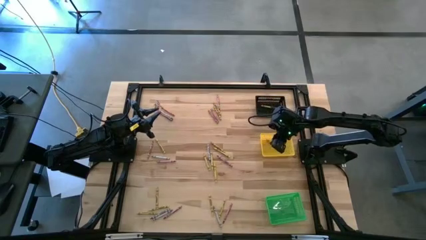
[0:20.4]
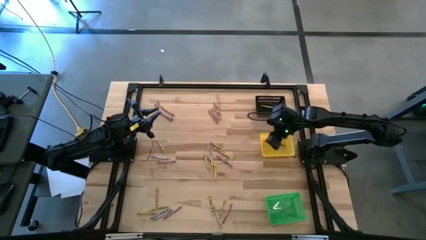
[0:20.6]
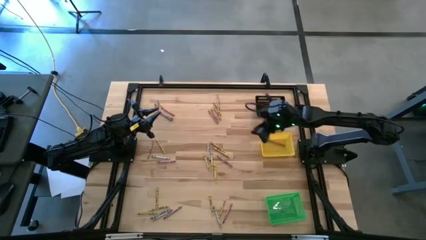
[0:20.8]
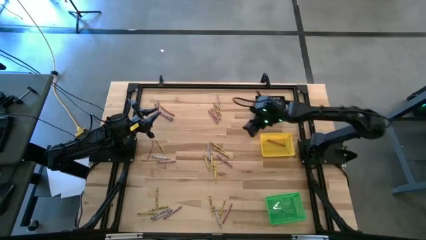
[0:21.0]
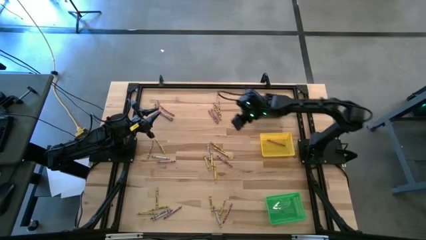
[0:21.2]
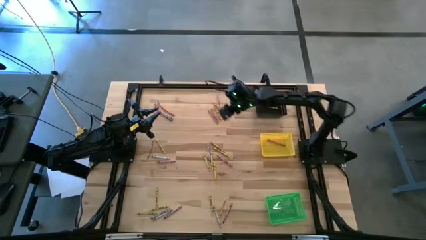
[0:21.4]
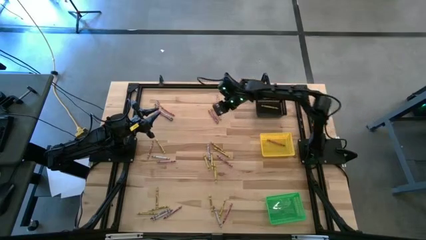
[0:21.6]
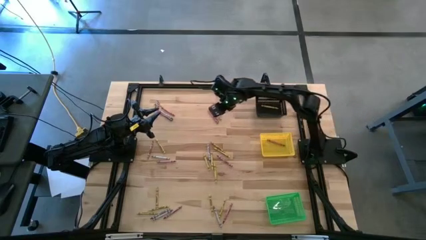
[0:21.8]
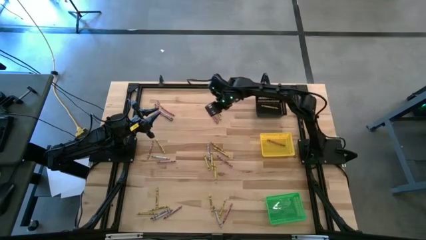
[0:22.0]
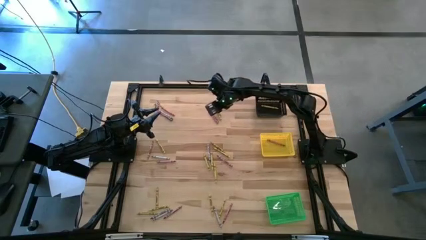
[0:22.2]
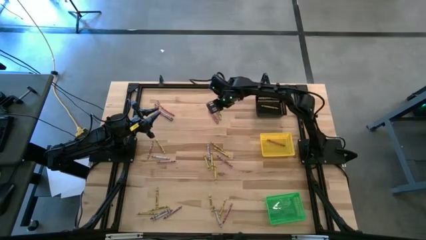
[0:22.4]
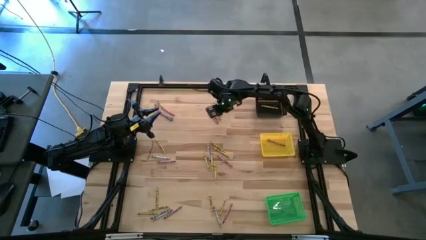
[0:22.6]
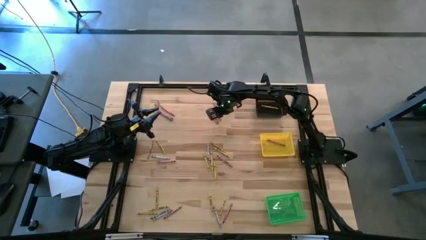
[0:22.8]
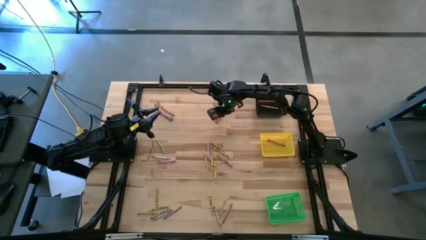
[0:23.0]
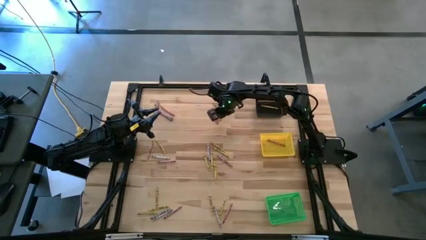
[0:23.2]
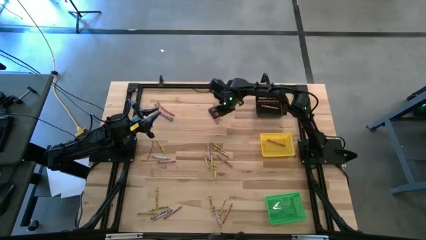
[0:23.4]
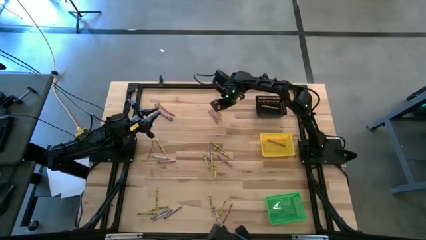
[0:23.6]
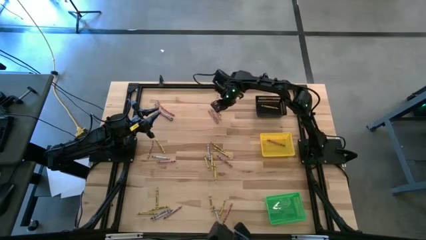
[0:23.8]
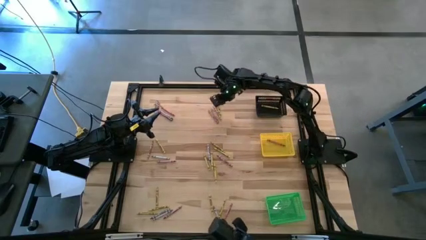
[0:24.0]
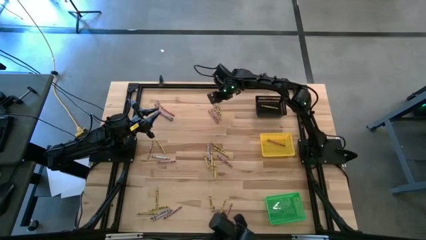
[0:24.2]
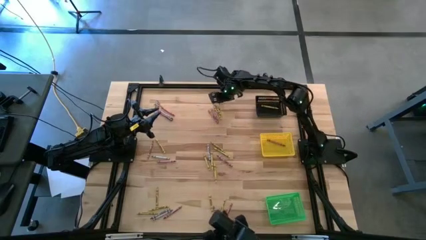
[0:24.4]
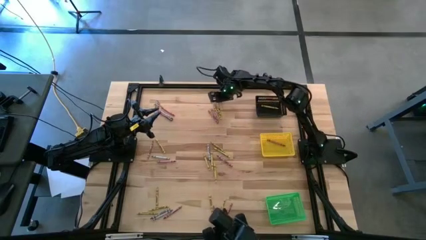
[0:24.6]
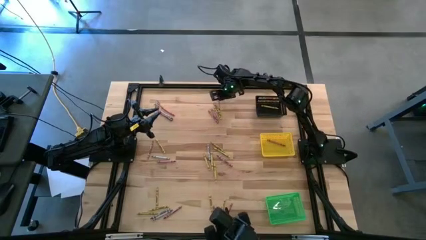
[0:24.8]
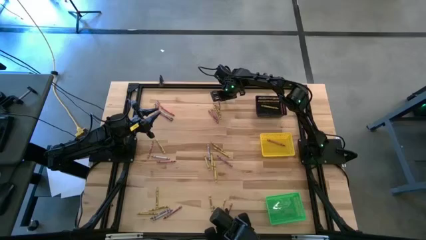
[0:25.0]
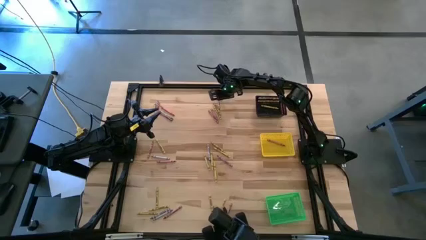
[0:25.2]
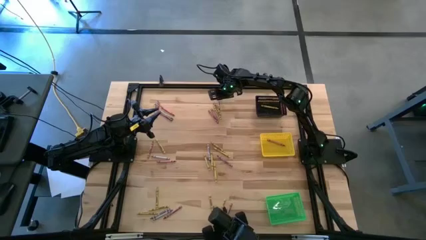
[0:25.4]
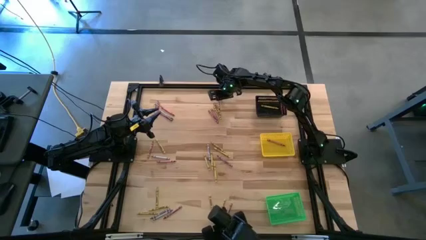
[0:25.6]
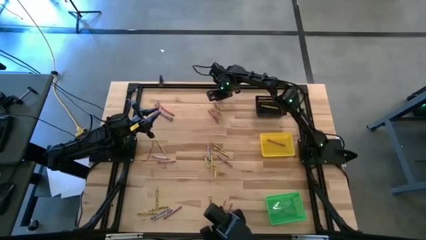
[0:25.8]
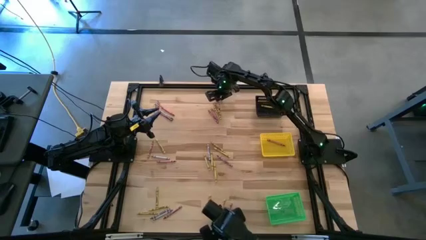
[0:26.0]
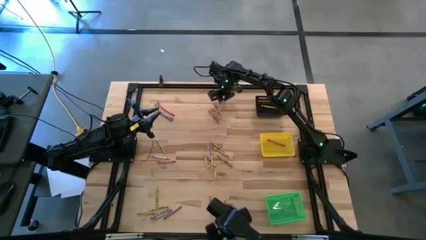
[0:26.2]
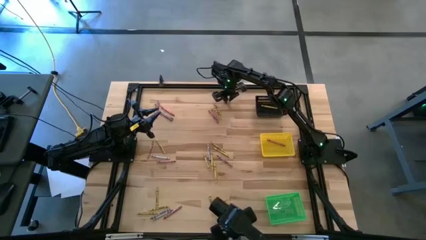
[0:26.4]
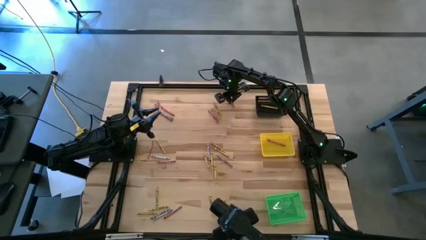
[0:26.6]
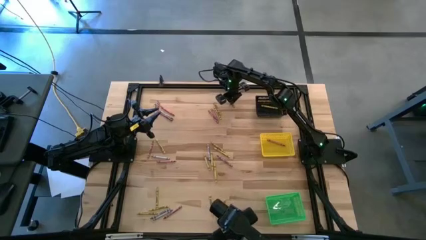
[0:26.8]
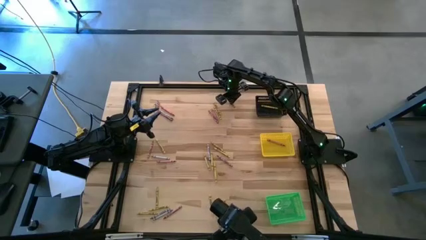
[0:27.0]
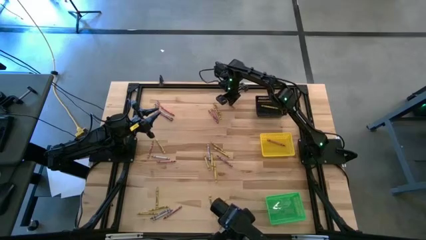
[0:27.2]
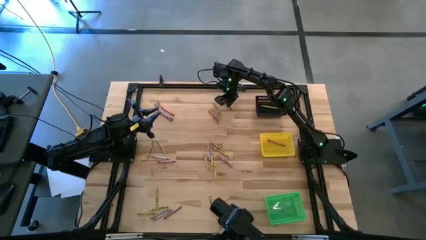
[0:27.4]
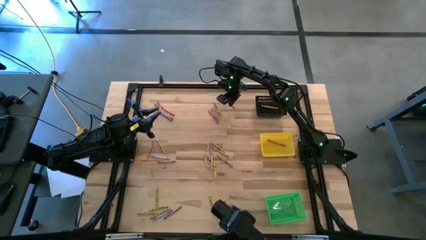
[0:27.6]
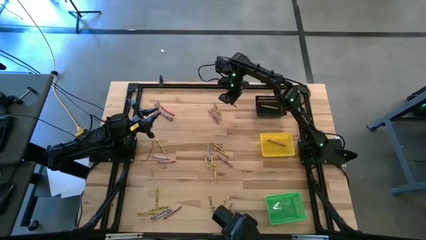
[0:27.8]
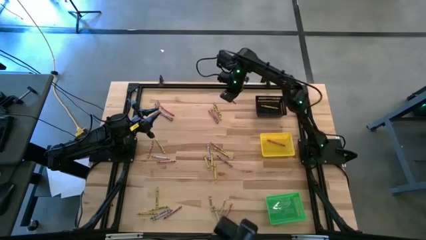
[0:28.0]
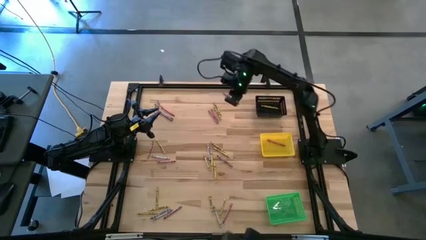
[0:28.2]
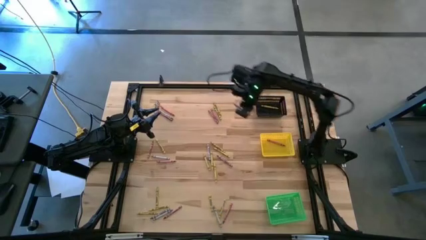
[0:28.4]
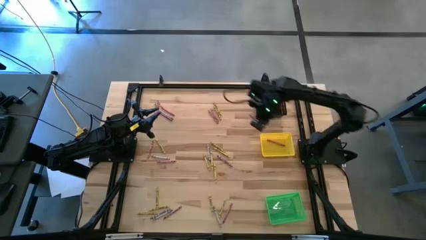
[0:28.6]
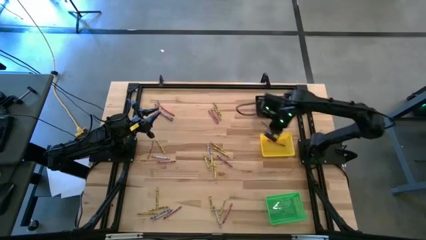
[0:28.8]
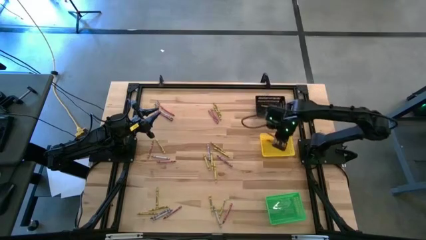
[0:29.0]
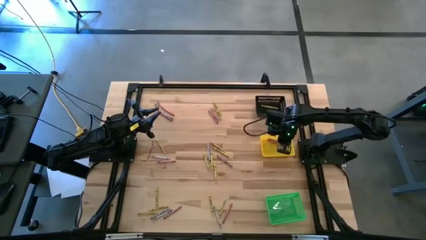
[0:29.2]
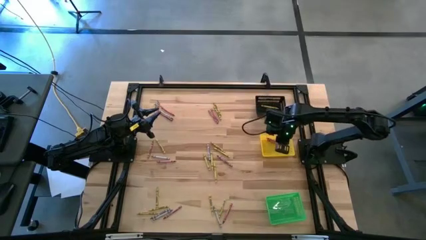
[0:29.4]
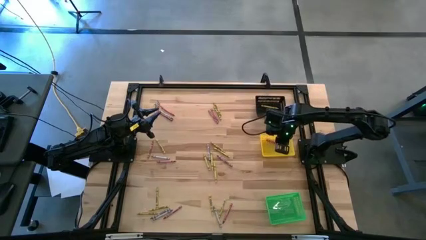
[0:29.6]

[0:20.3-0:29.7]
Task: Sort crayons
Put the red crayon into the yellow bin

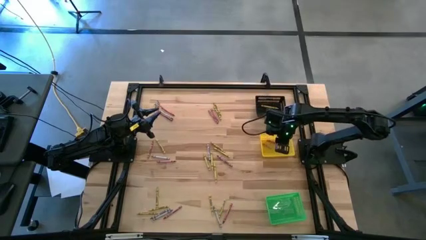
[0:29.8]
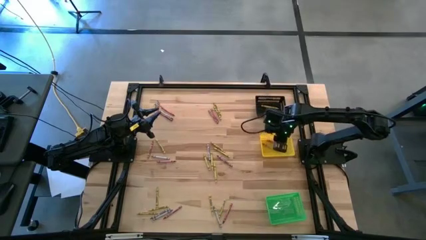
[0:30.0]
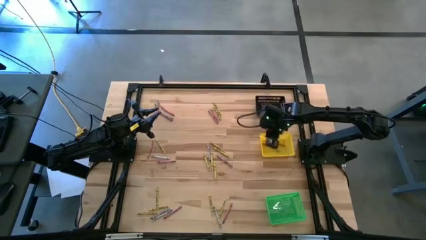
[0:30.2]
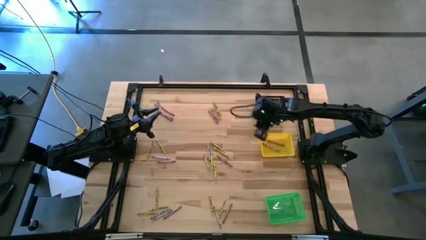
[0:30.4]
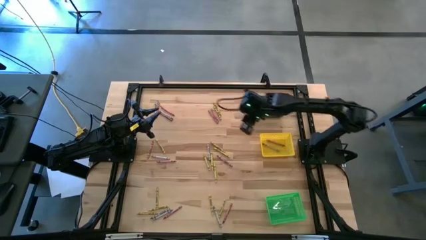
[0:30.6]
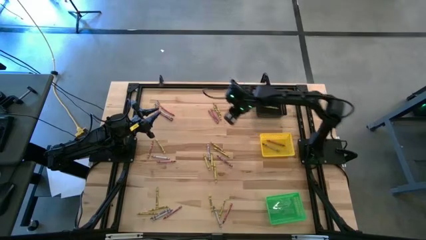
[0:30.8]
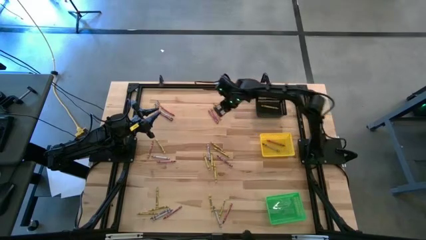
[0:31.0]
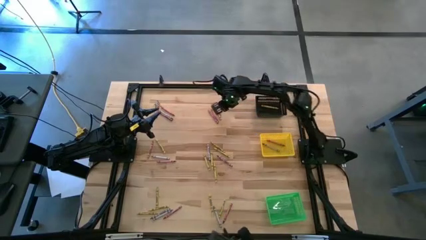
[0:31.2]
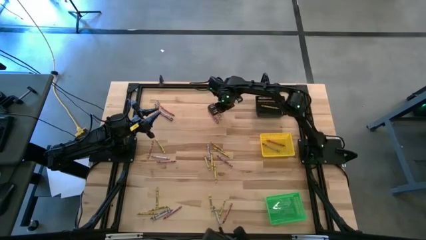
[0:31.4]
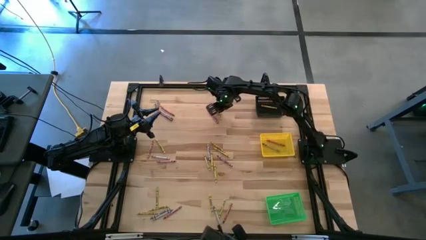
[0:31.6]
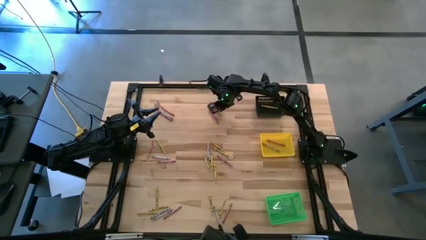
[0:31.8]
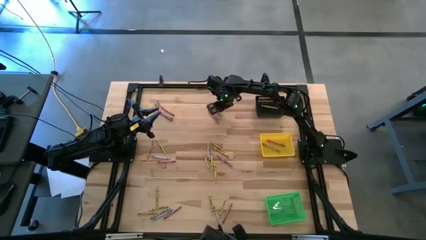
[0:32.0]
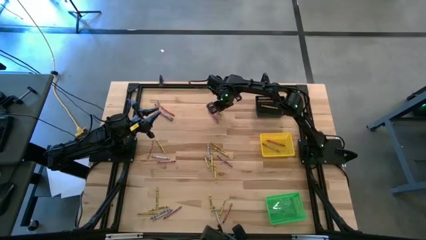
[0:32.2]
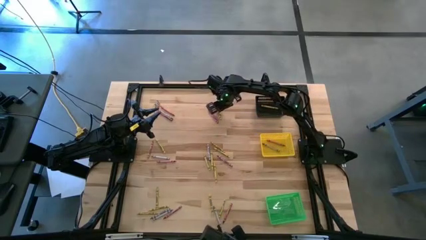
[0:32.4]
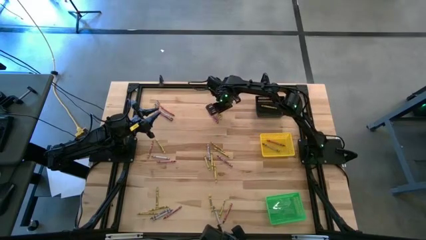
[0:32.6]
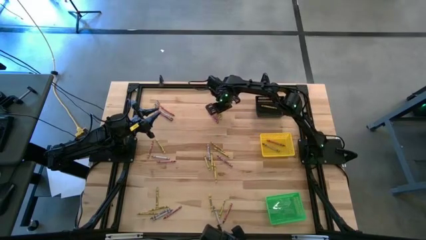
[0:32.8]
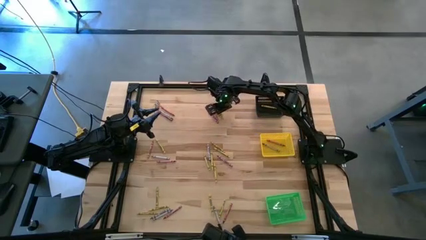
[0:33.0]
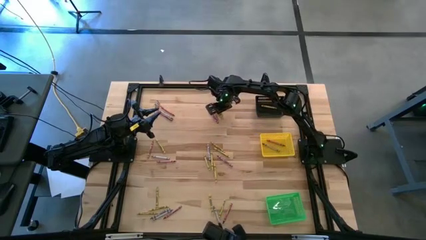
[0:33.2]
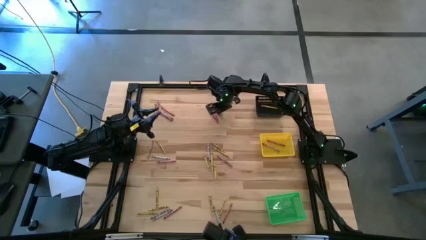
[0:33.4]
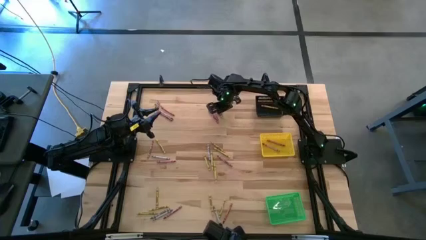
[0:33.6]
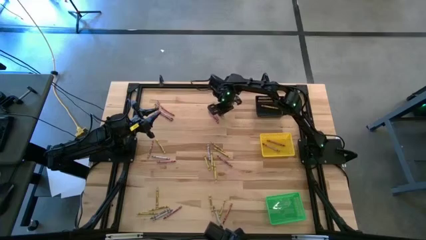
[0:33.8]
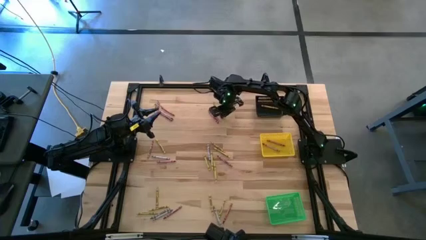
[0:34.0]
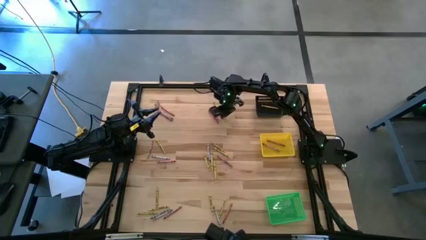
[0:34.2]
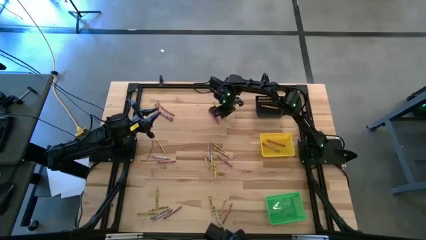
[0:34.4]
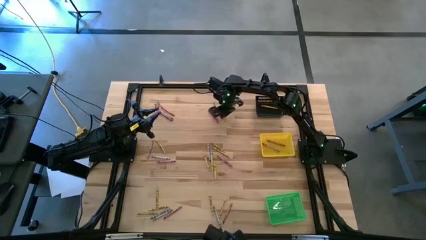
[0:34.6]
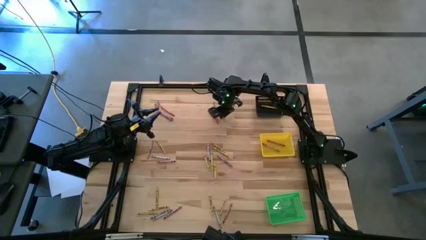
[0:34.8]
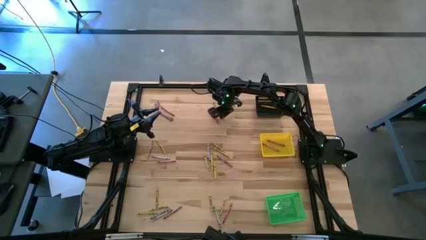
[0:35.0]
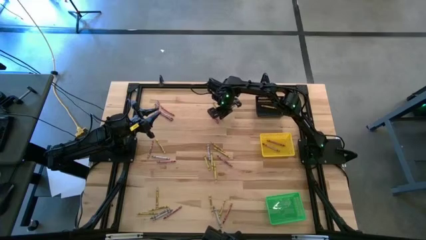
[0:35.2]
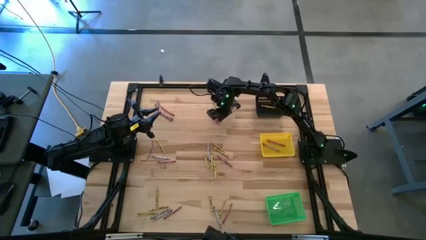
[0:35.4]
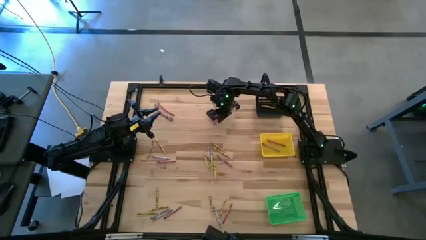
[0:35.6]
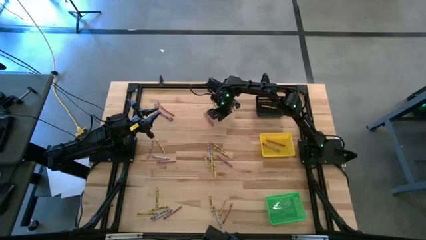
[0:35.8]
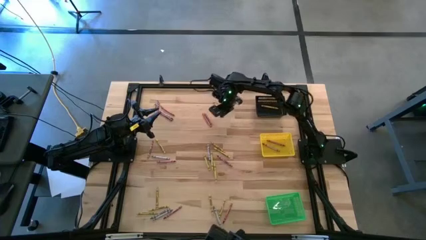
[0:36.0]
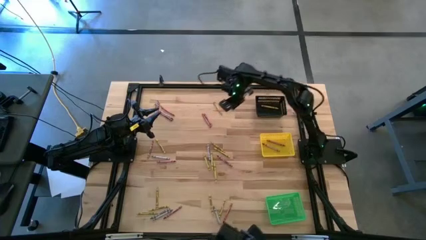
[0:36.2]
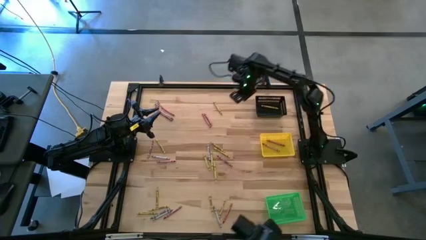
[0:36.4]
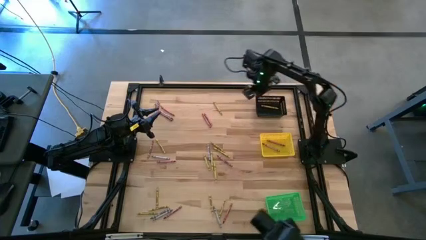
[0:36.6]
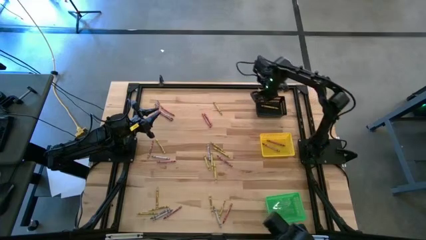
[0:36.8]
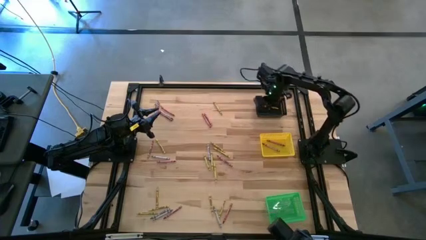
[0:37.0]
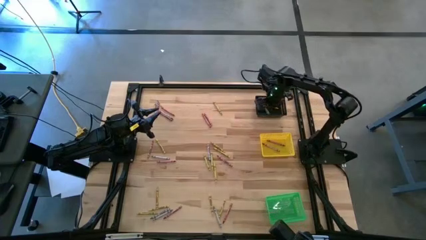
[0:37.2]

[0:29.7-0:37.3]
Put the yellow crayon into the black bin
